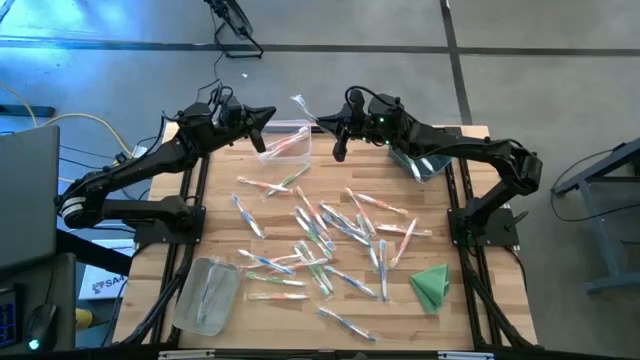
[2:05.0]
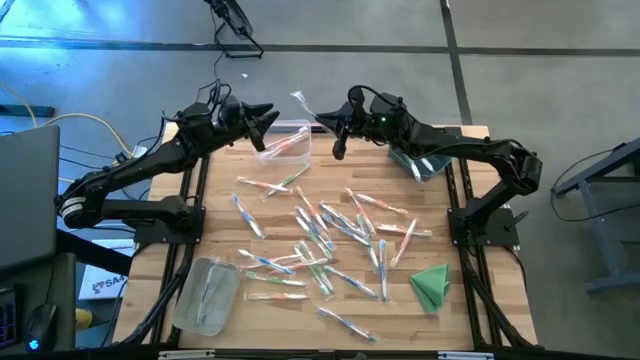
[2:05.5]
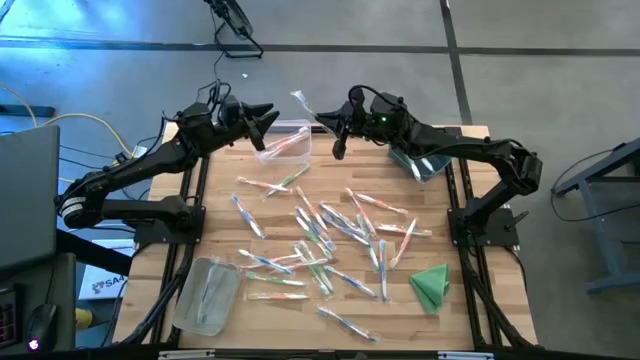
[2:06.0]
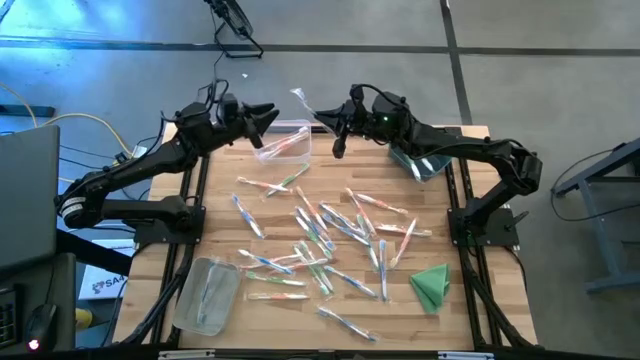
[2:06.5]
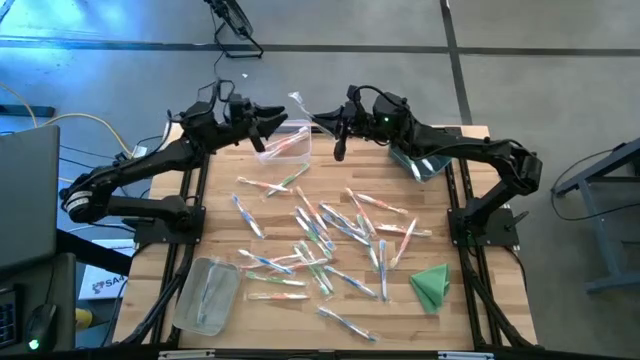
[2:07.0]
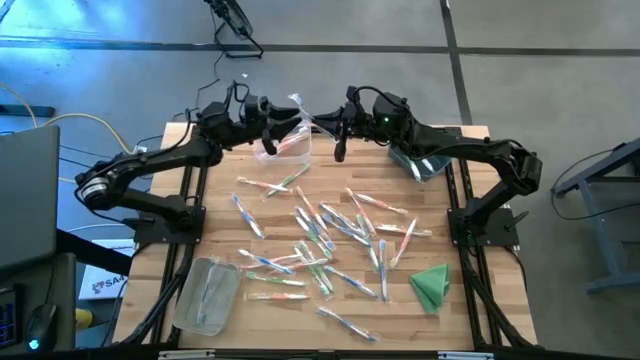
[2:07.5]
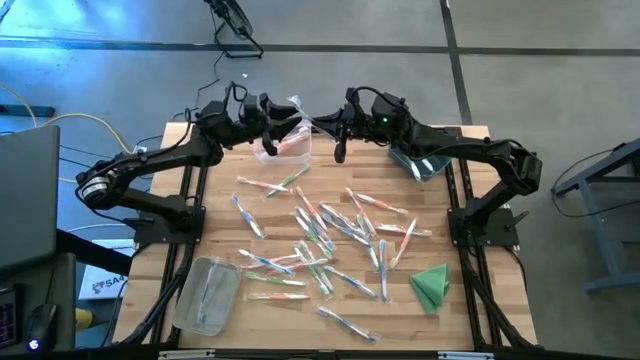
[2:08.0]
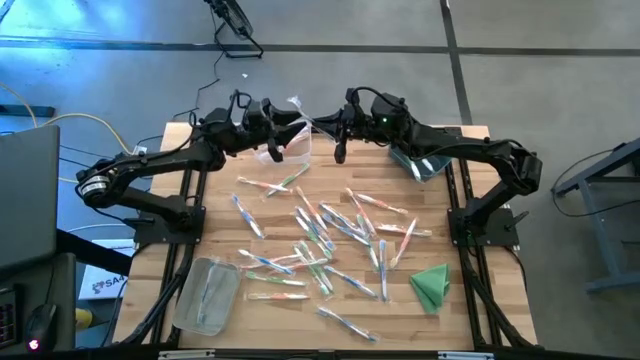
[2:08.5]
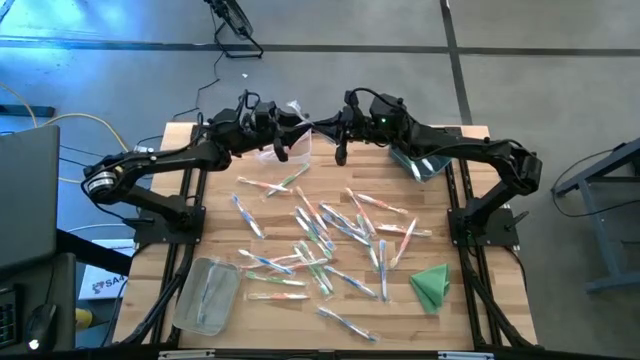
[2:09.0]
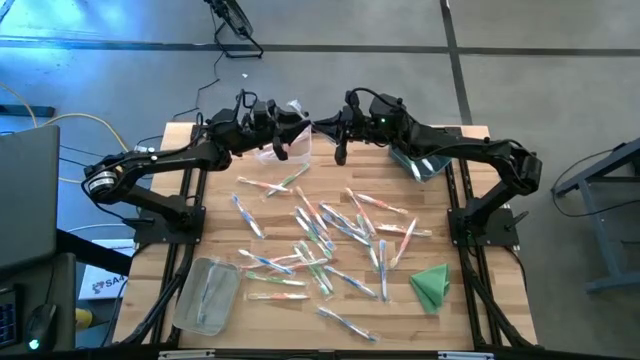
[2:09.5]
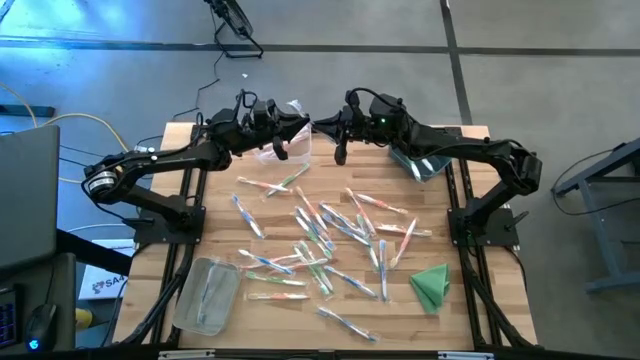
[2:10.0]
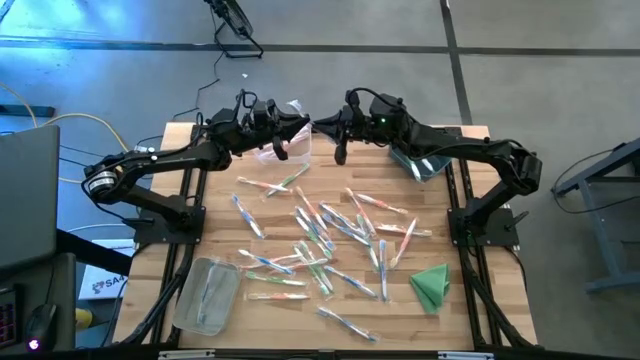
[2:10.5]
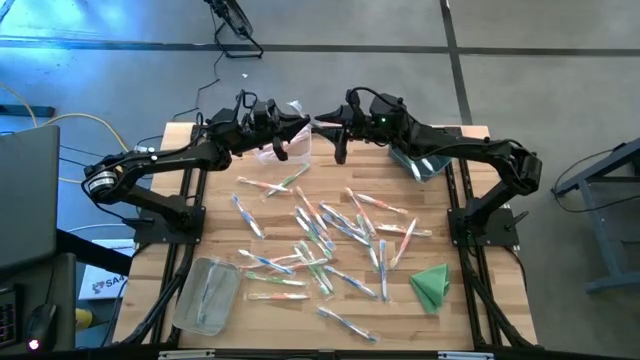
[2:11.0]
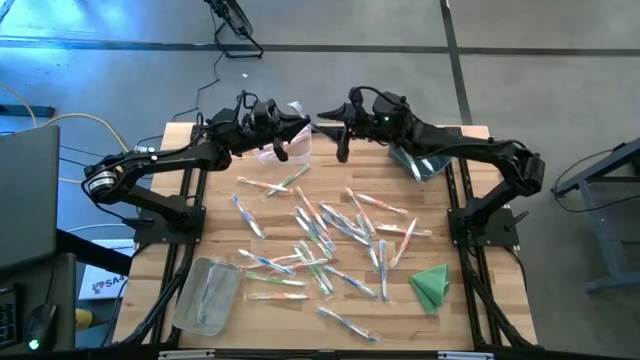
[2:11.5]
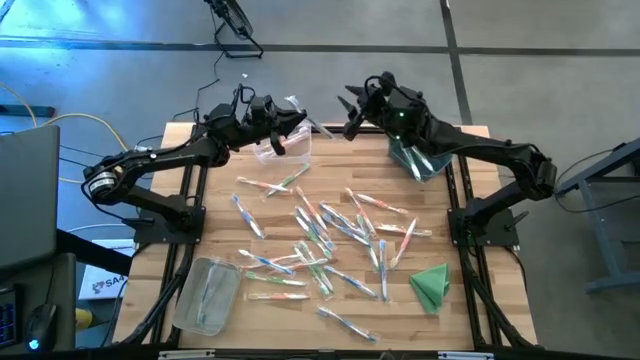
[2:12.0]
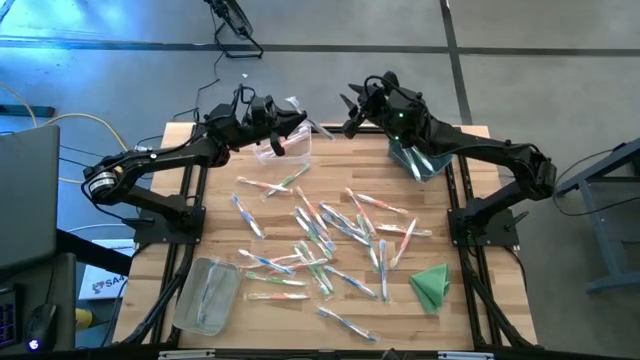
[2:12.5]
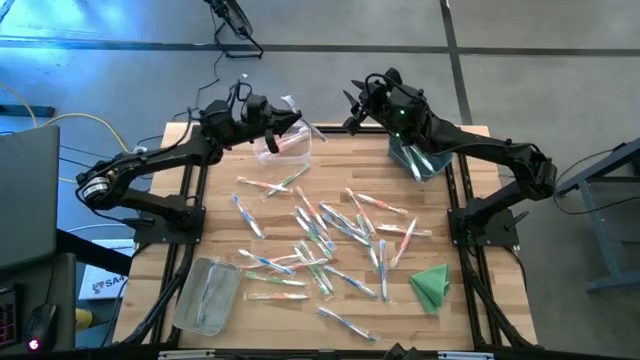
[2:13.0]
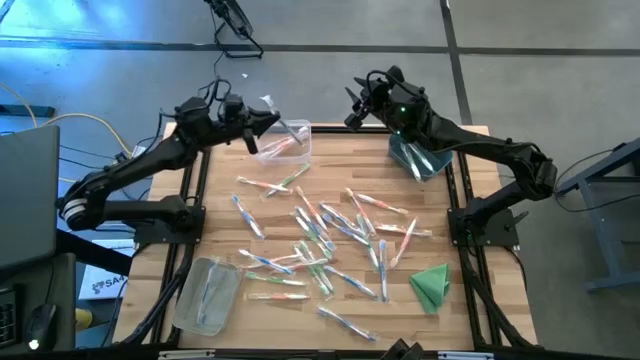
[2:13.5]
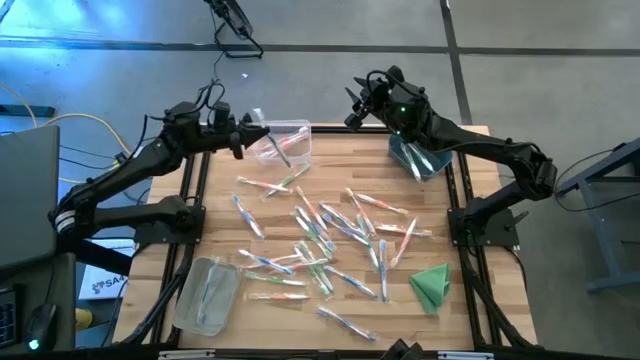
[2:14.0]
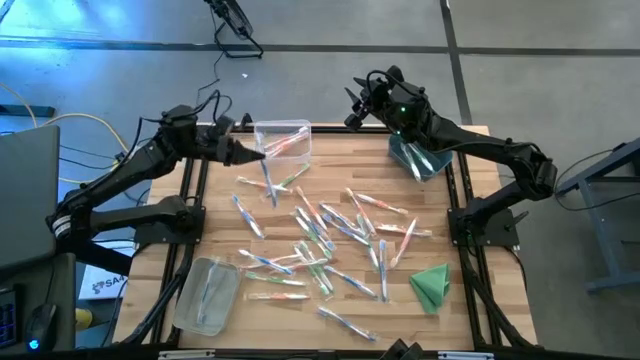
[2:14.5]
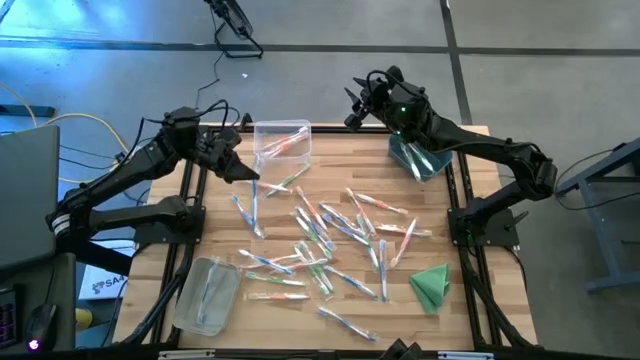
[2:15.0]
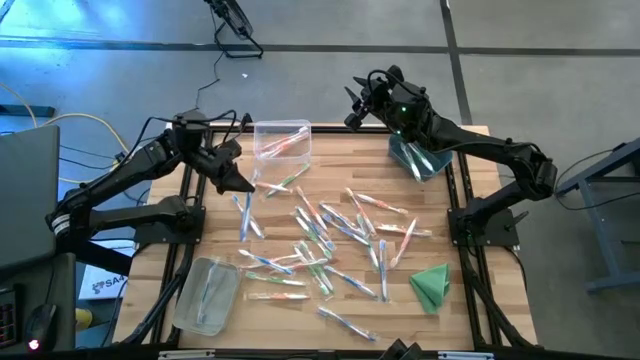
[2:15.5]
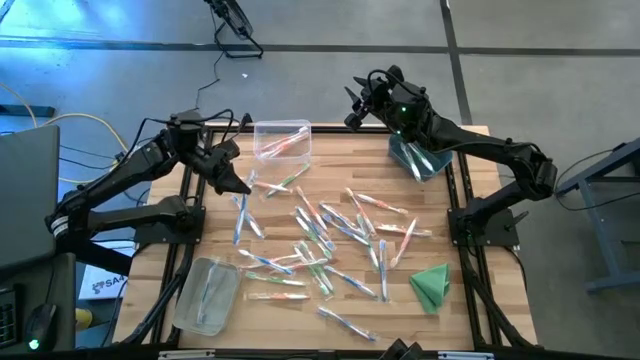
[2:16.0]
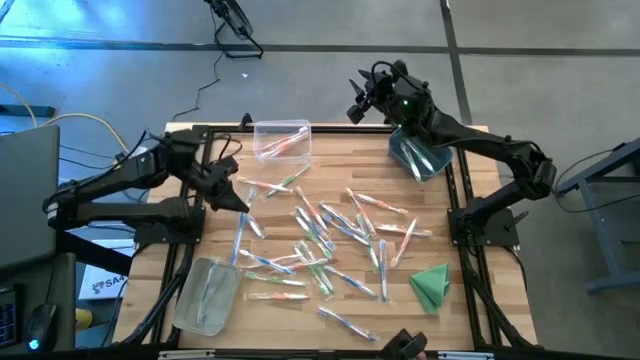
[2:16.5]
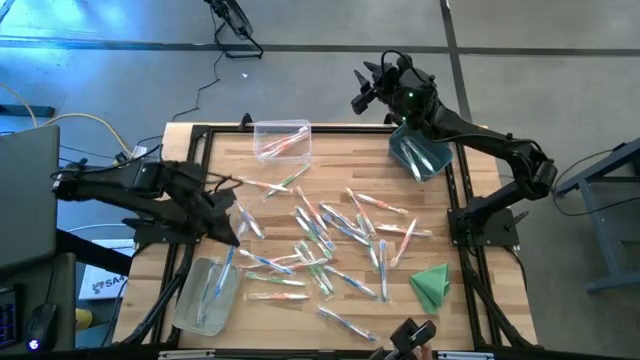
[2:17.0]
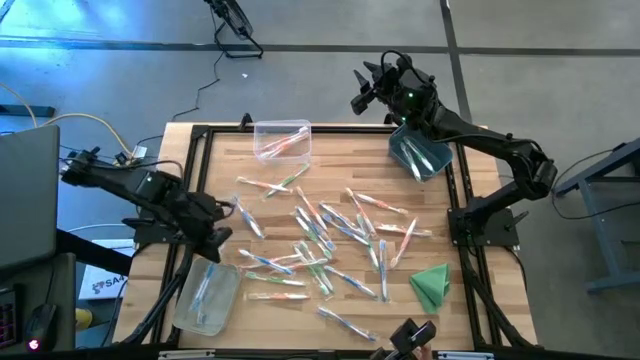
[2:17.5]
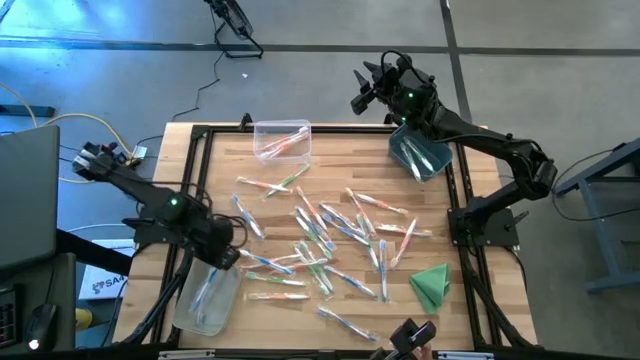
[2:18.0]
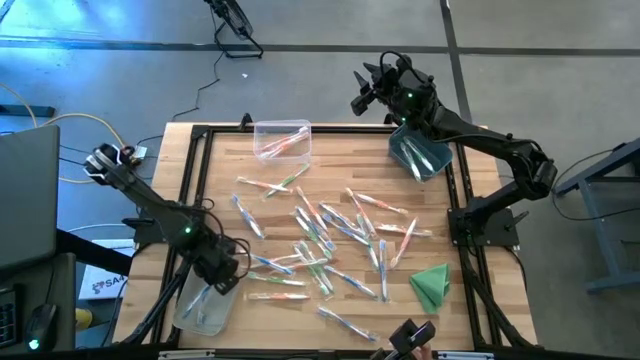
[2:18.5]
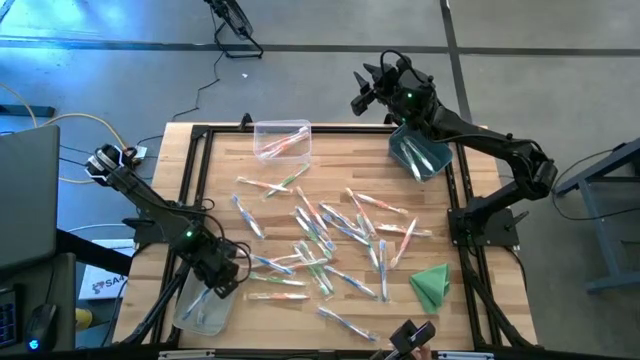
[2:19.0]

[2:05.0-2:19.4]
Task: Pick & Place Toothbrushes
Put the blue toothbrush into the gray bin
